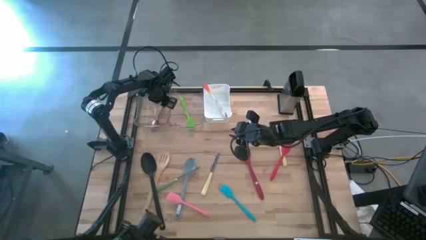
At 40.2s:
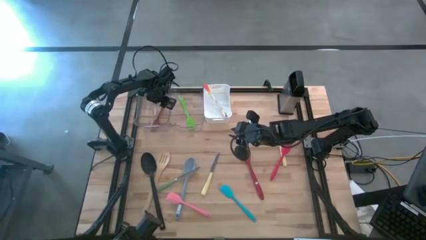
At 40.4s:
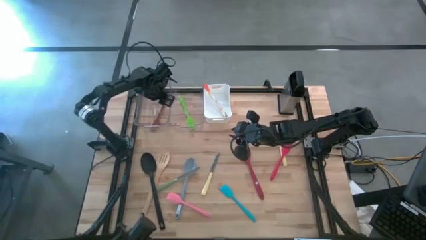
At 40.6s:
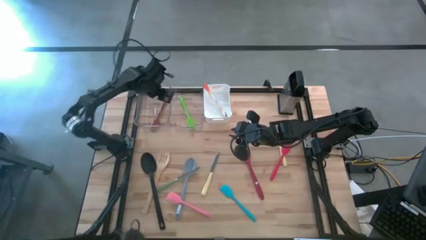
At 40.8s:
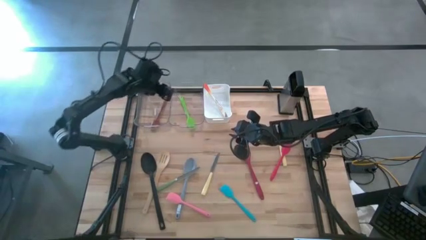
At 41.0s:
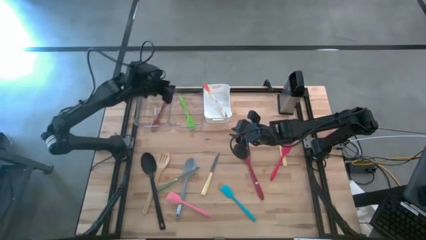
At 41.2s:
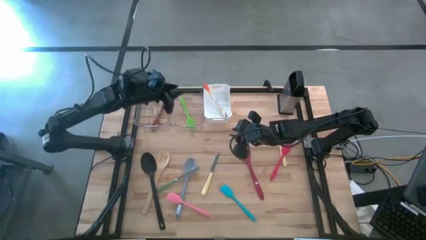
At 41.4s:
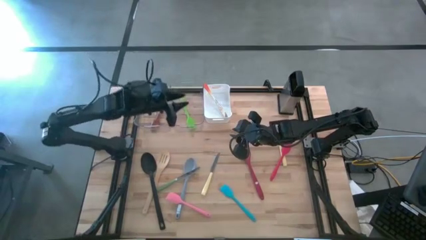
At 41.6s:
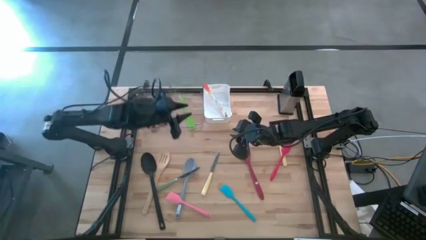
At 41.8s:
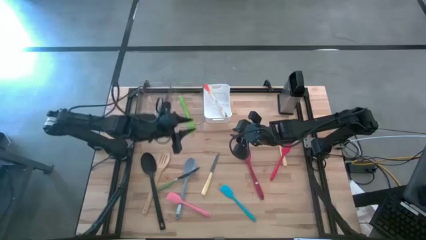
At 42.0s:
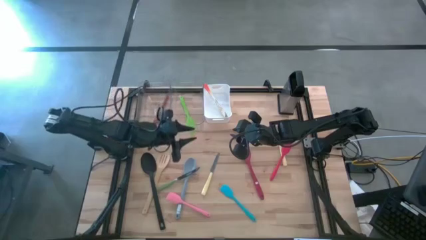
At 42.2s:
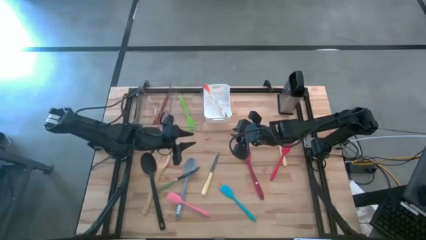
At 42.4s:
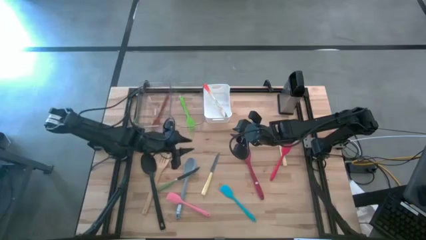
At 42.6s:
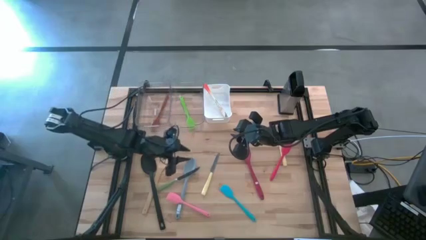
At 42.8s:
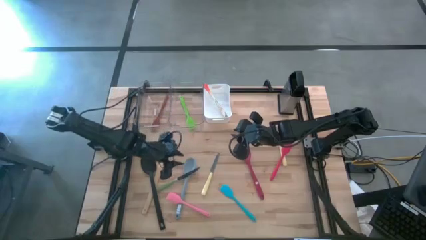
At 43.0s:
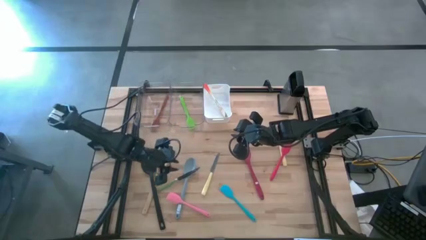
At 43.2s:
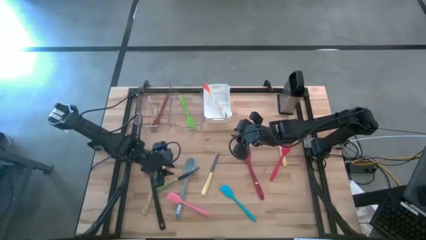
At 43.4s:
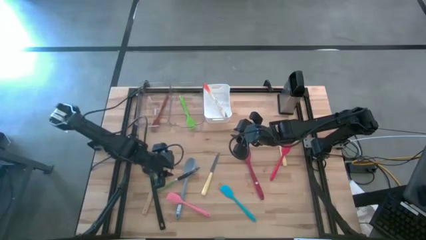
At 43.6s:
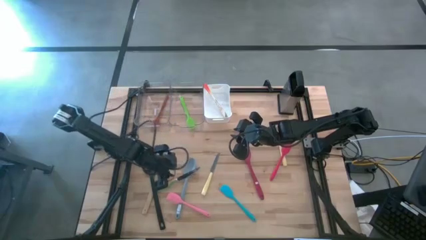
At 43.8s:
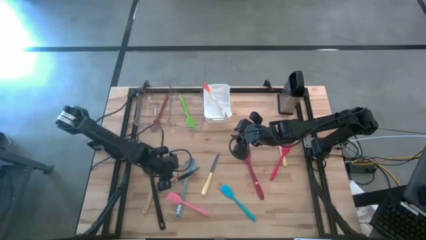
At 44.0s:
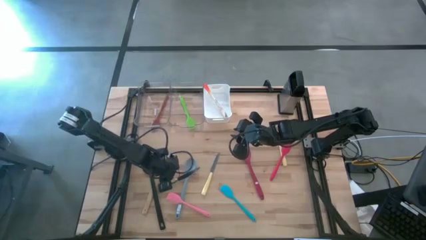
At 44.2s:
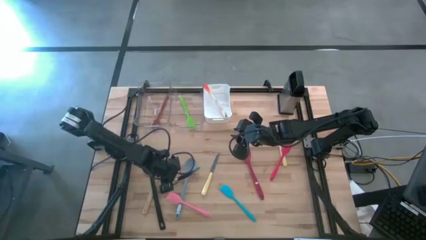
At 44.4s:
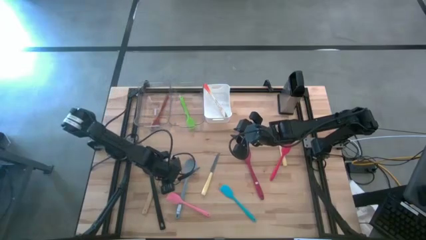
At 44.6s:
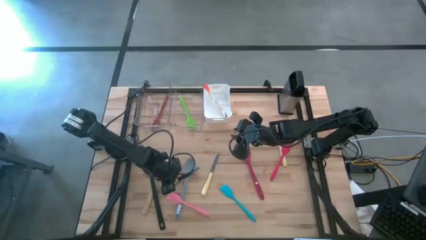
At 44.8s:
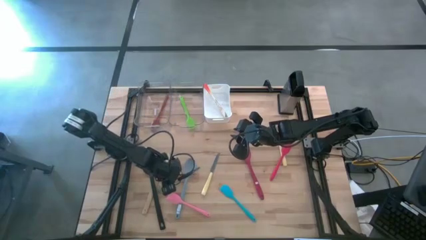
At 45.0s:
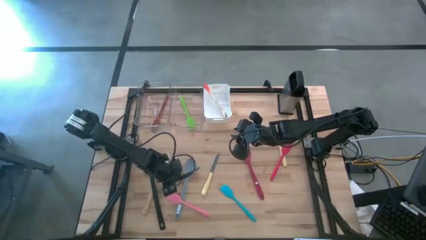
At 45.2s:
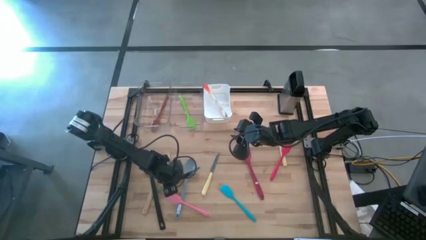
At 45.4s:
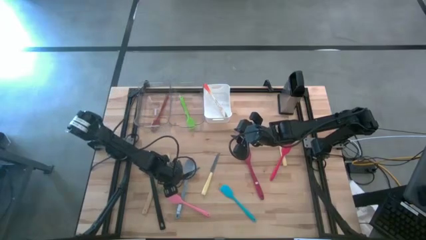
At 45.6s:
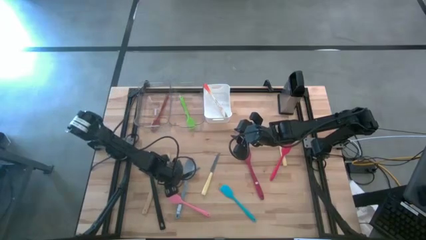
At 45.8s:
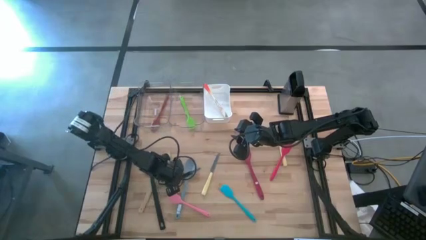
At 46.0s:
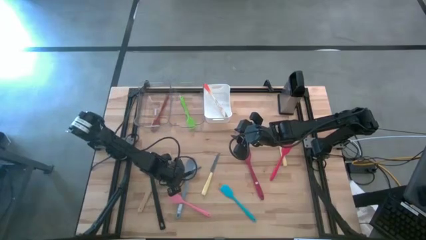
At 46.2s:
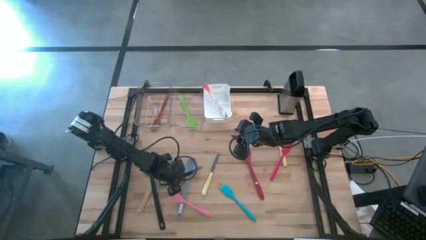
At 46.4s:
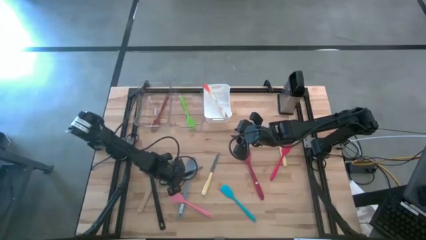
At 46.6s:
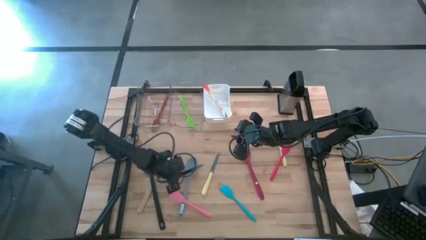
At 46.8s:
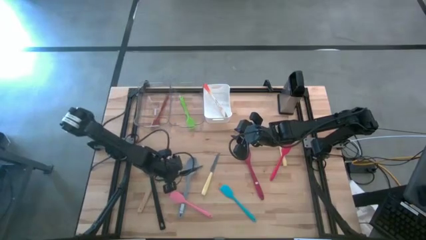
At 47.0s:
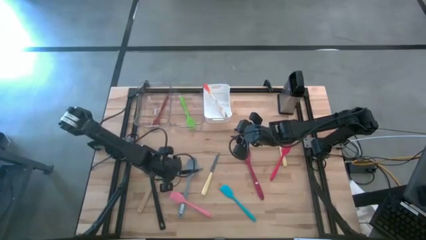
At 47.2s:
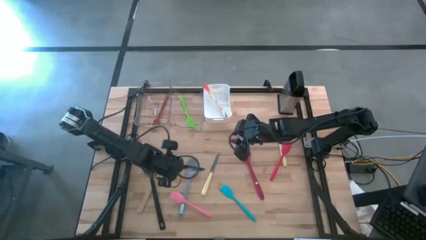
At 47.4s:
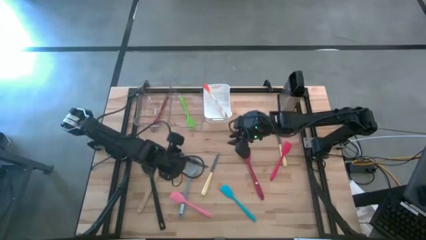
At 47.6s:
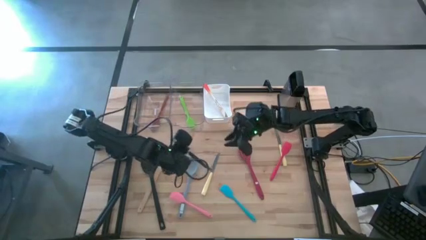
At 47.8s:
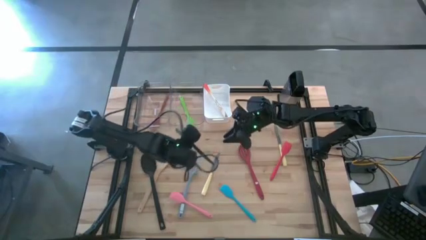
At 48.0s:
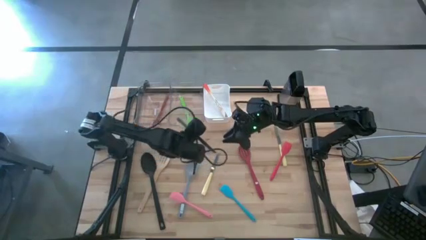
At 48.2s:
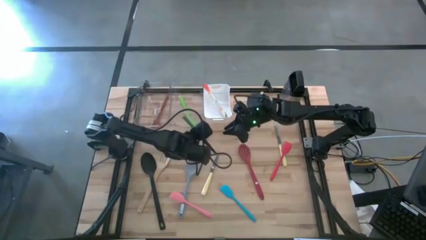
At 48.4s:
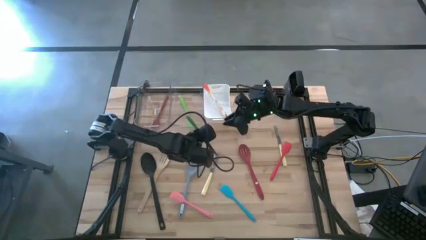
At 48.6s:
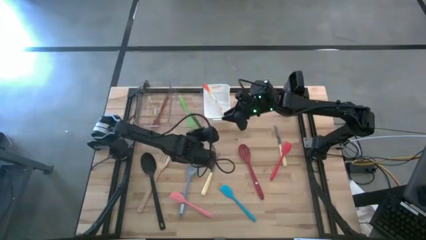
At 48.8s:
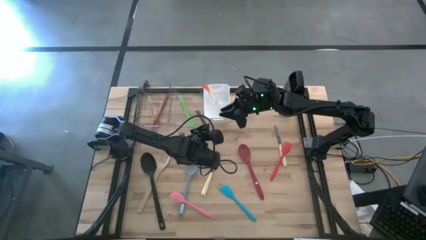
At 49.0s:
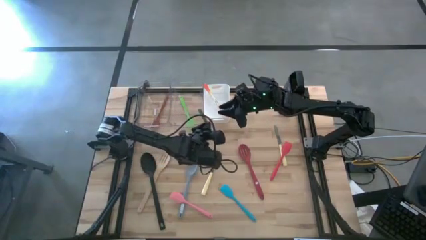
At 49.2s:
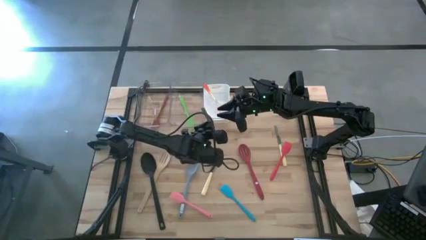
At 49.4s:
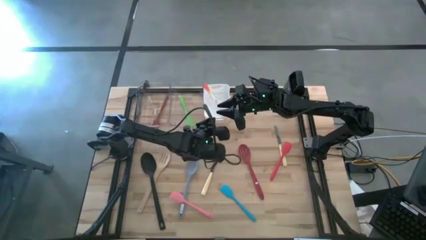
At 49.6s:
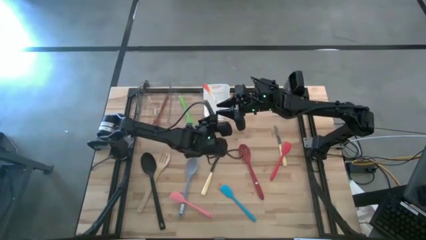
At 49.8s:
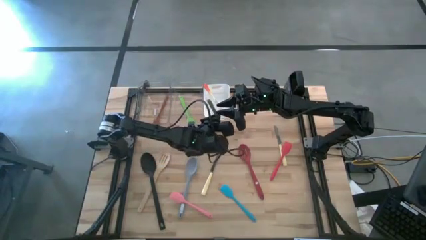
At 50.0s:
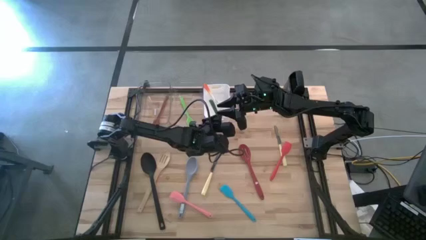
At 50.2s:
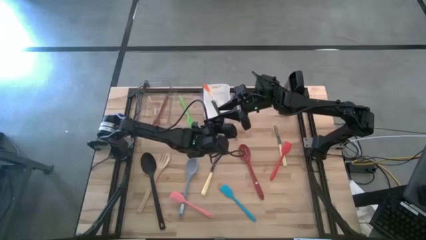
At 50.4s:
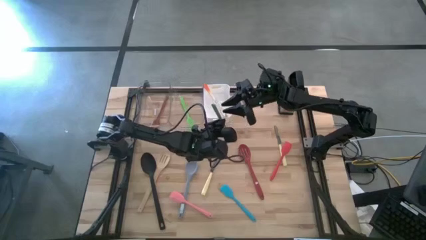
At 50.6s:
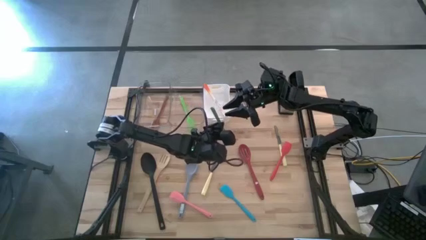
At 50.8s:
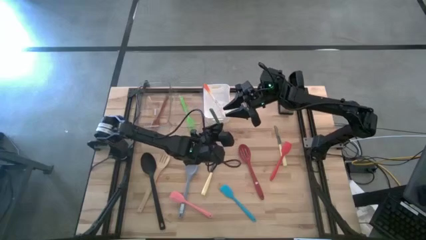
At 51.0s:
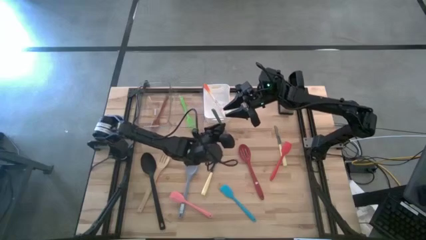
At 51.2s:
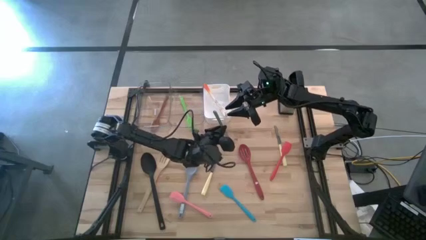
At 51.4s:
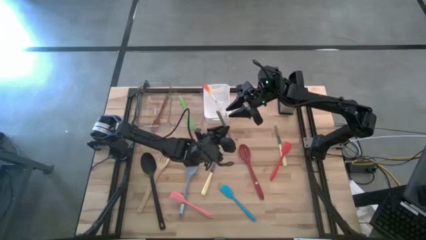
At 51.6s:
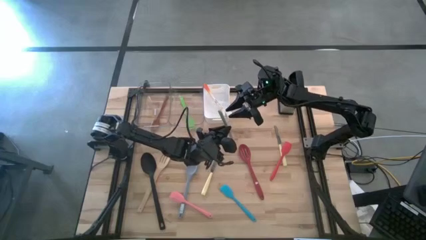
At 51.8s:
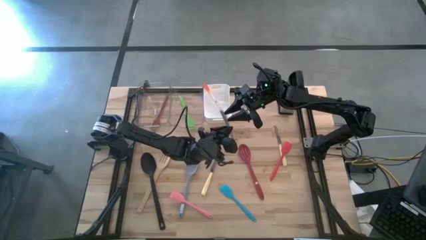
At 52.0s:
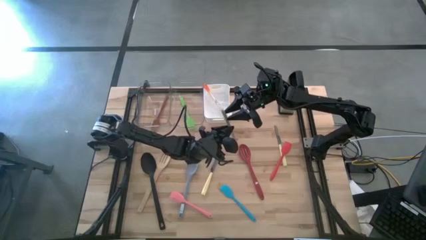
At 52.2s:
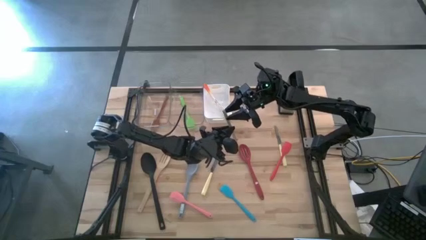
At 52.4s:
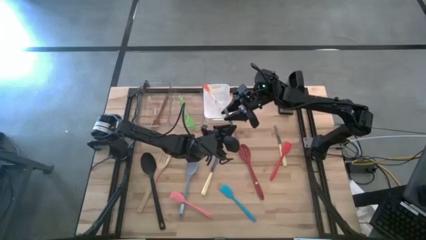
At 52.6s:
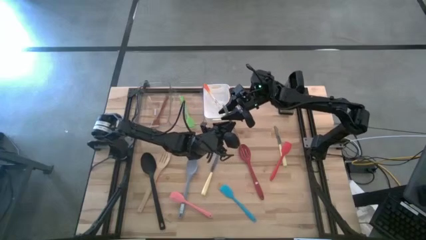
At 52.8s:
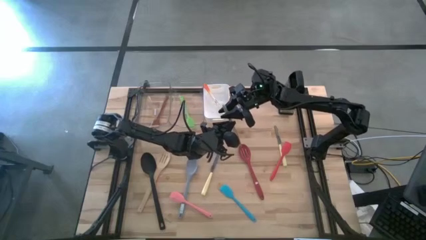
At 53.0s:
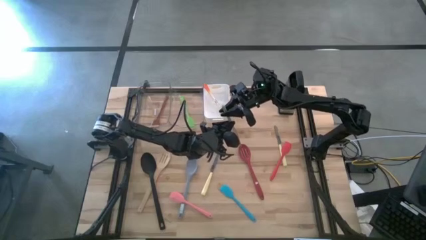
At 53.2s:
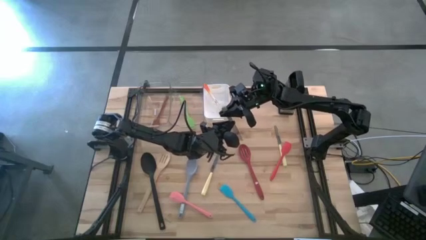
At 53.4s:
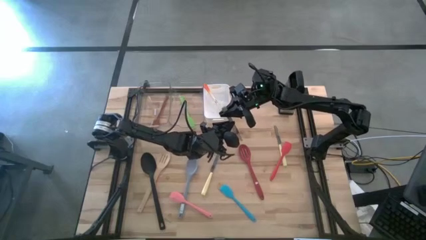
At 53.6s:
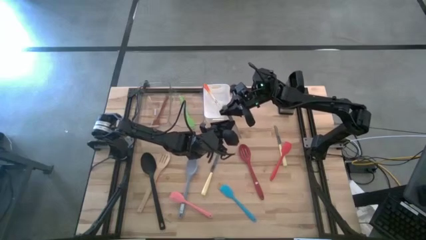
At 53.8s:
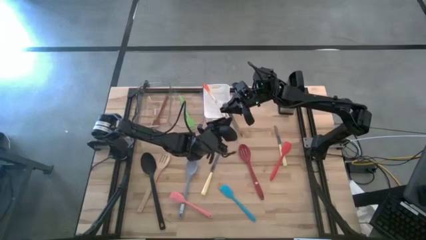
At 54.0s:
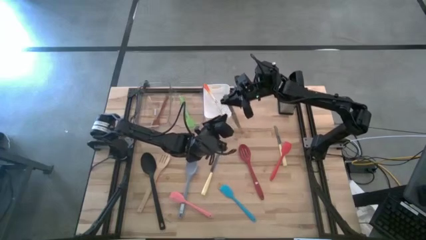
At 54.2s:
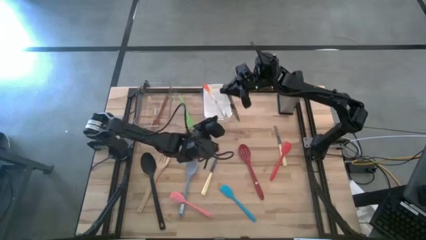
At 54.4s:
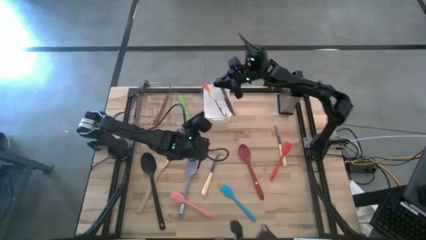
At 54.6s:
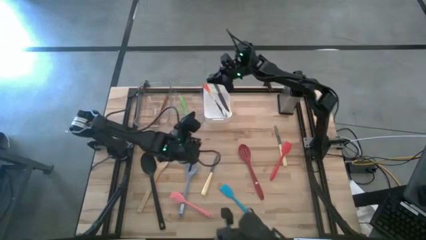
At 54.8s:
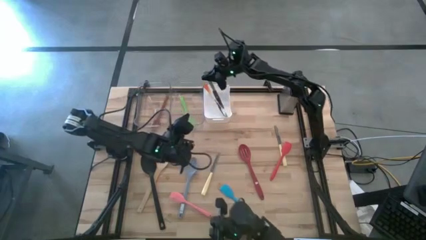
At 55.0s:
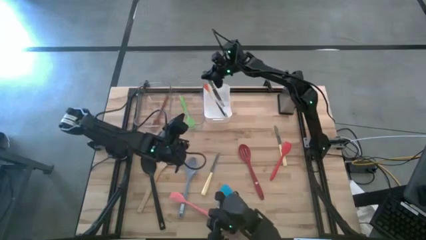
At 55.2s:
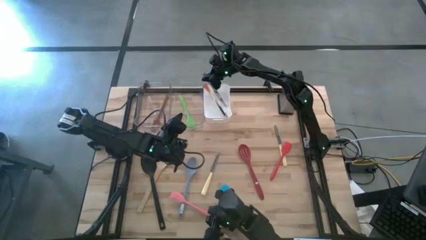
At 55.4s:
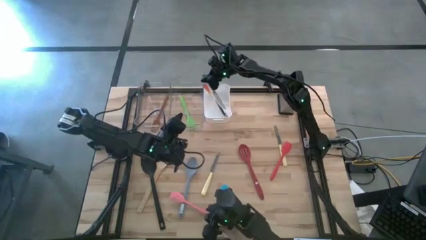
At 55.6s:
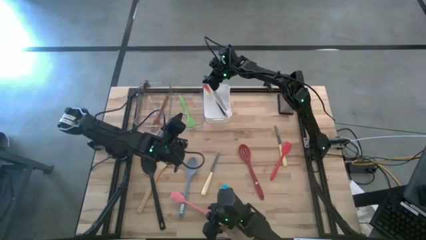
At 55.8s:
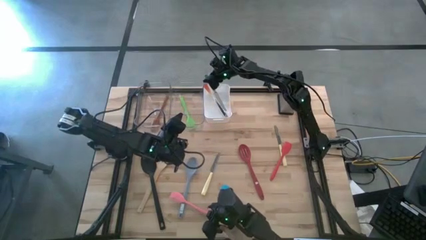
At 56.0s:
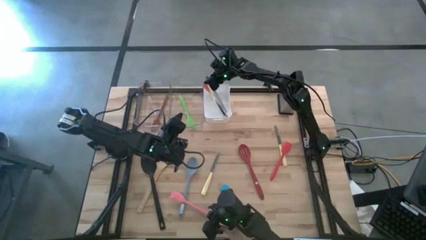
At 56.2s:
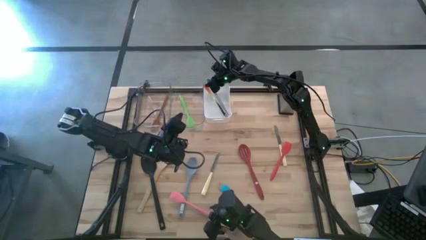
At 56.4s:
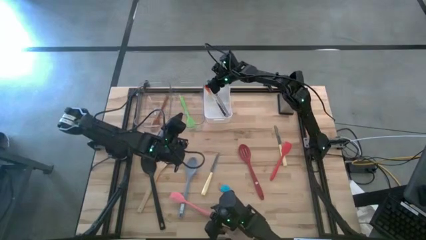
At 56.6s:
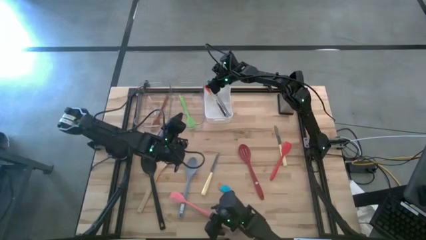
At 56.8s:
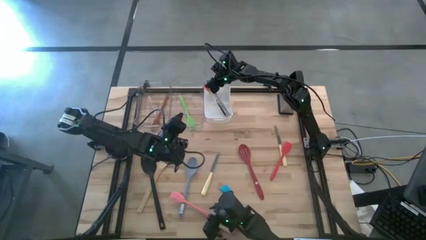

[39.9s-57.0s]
Task: Pick & Place Kitchen Items
Put the green table knife into the white bin
